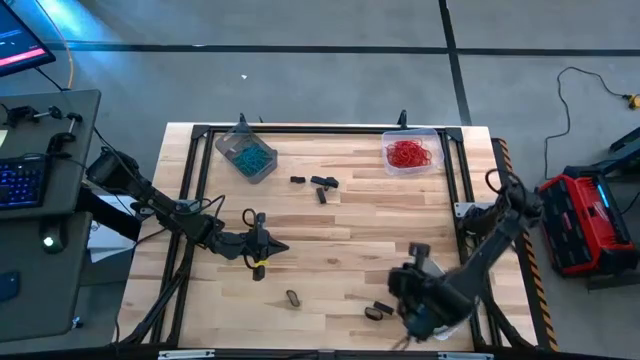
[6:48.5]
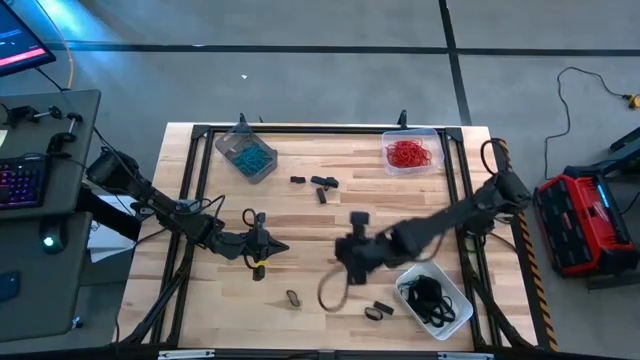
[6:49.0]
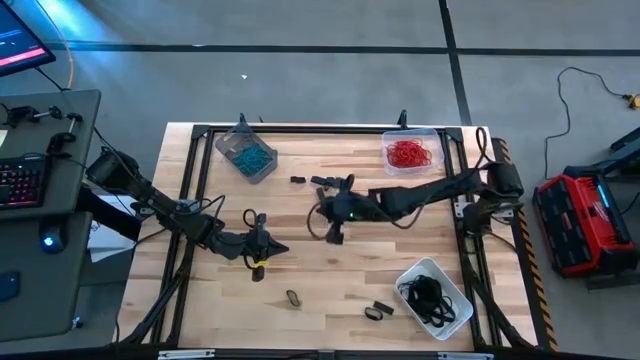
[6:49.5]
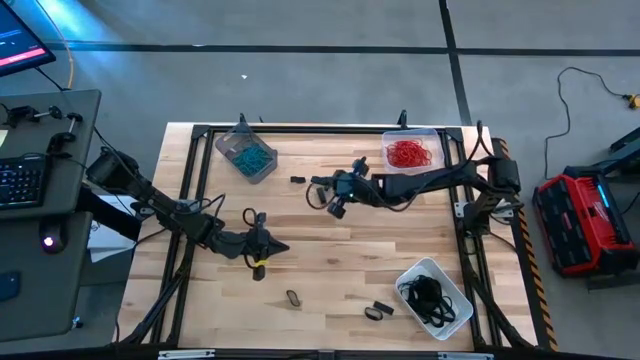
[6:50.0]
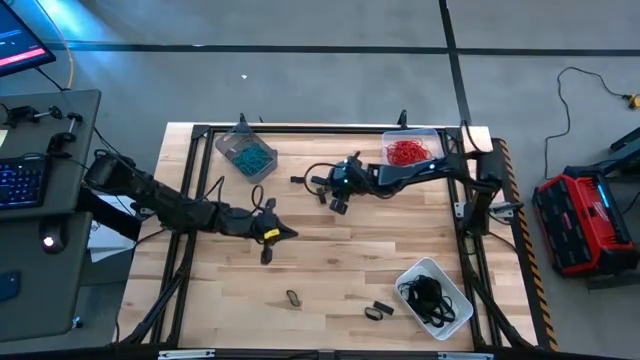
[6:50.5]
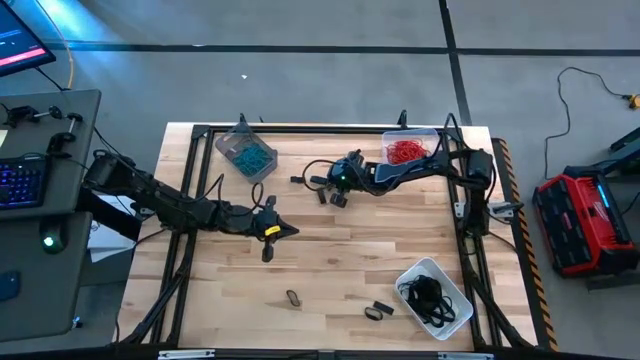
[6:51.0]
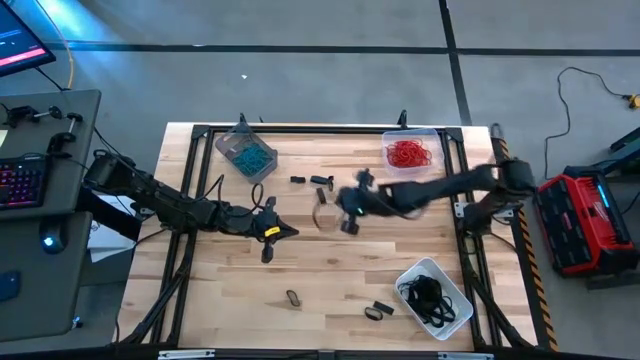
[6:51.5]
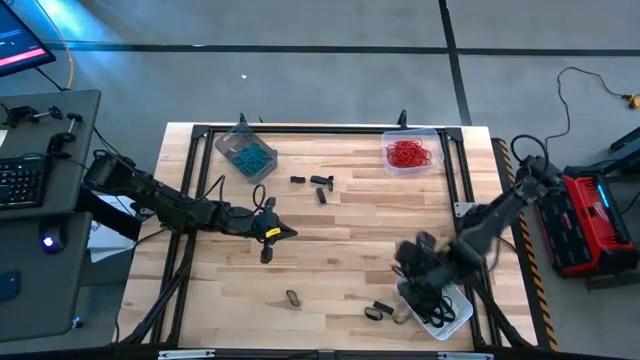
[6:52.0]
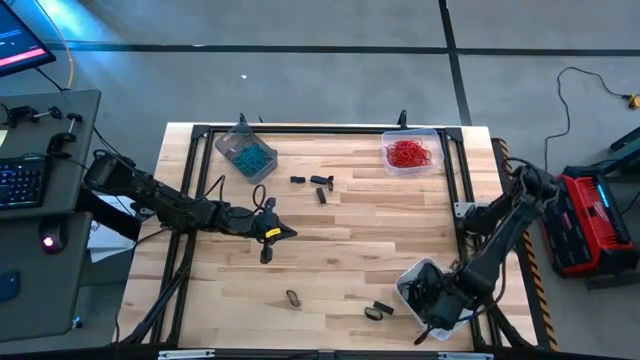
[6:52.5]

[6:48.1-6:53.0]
Task: Sort rubber bands into baskets
Put the black rubber band into the white bin

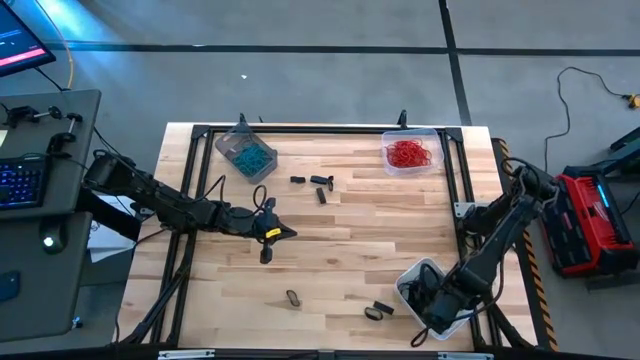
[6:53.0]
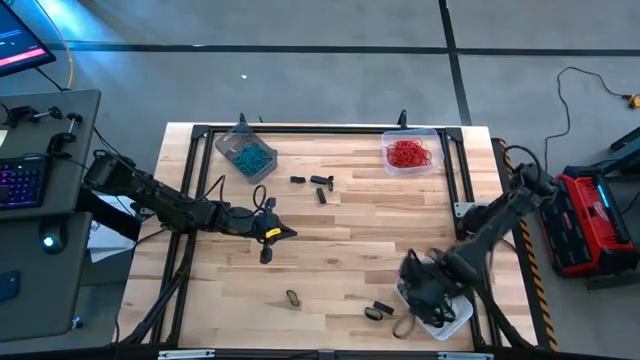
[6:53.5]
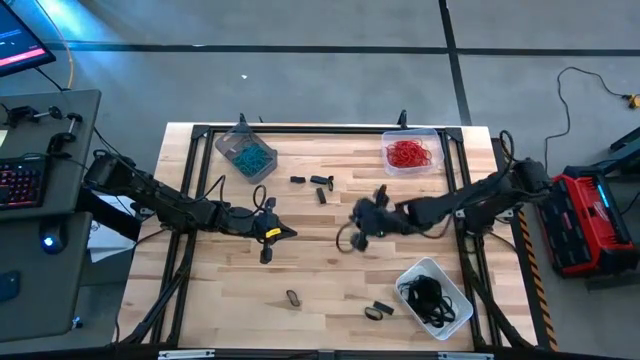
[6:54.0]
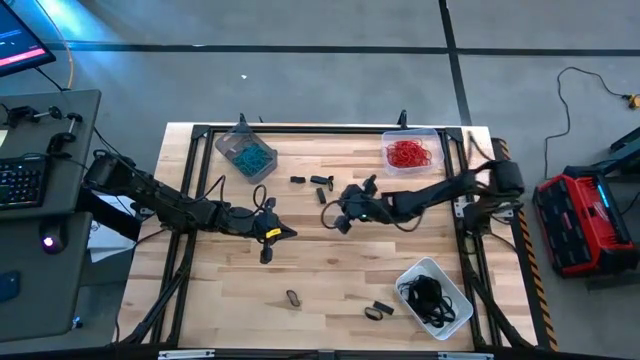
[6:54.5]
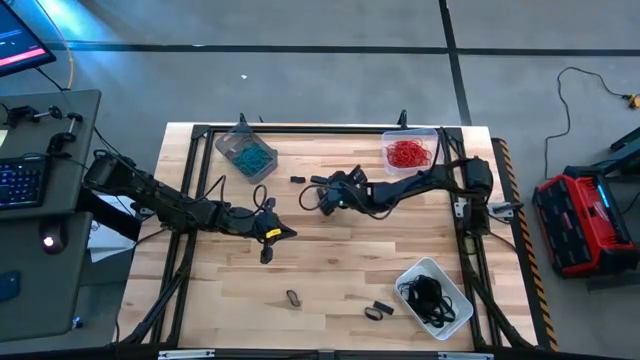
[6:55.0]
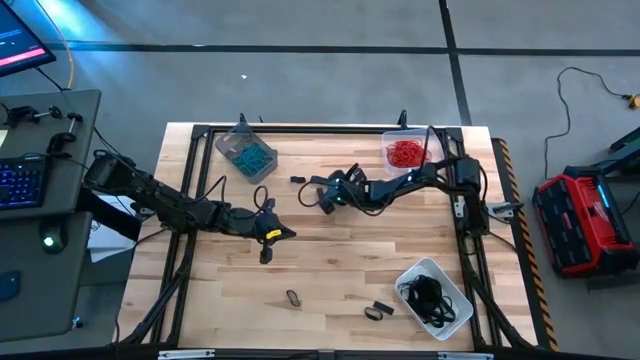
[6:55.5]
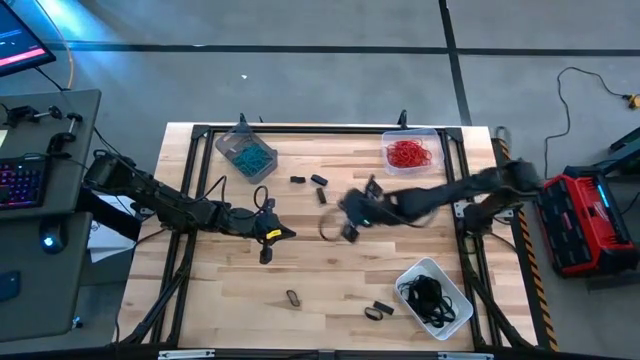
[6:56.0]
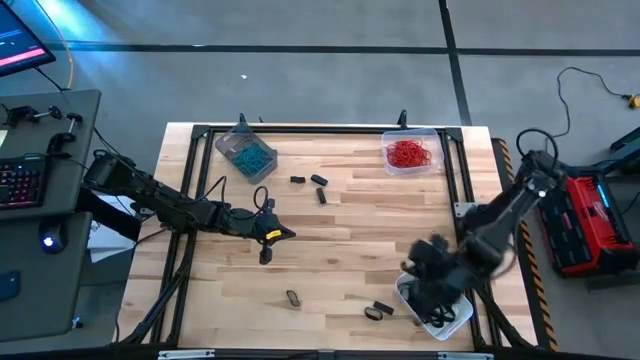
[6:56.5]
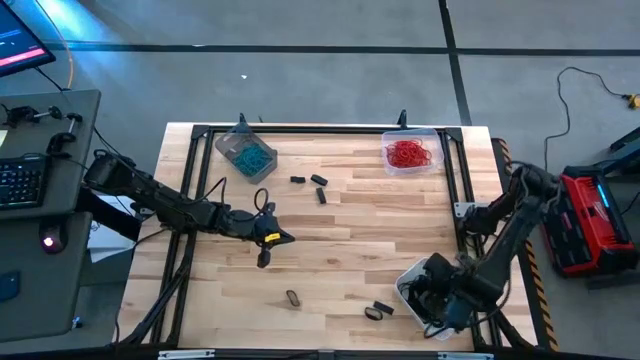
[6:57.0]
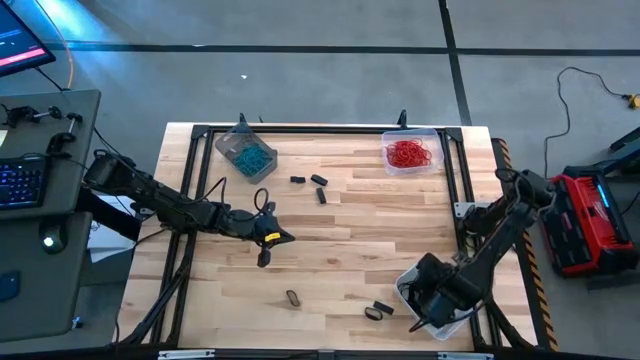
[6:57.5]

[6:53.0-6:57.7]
Put the black rubber band into the white bin

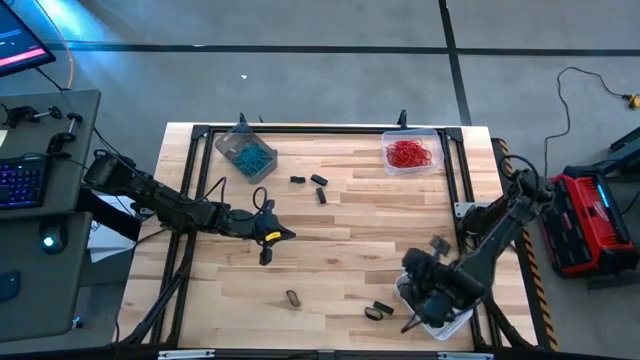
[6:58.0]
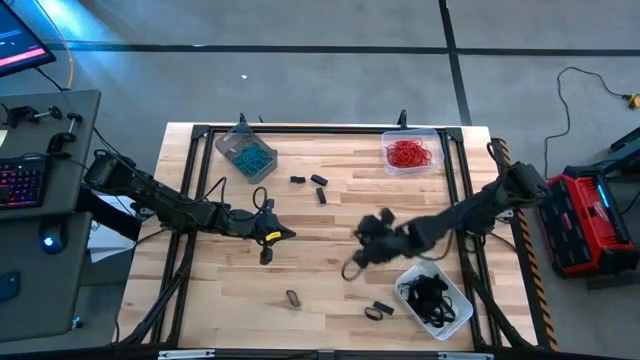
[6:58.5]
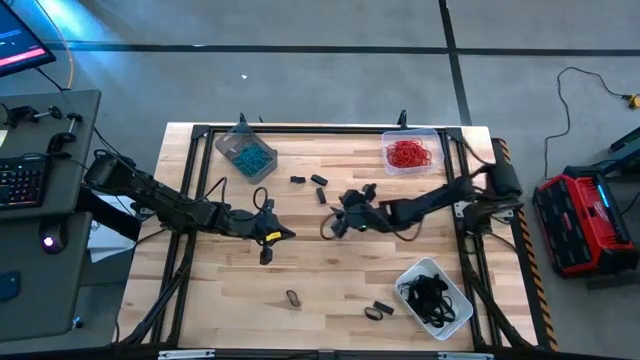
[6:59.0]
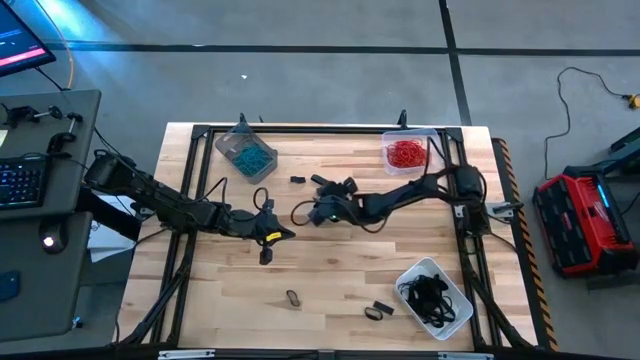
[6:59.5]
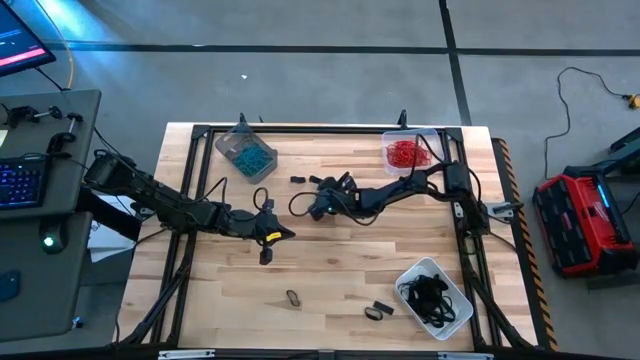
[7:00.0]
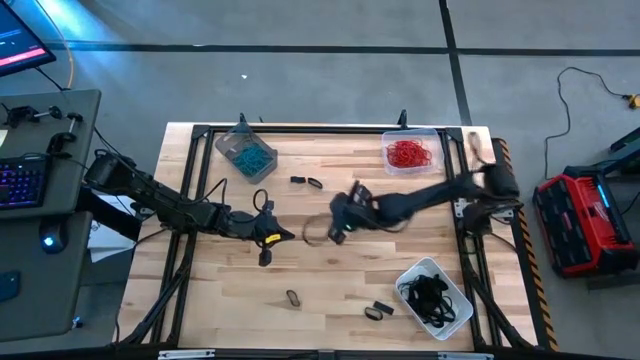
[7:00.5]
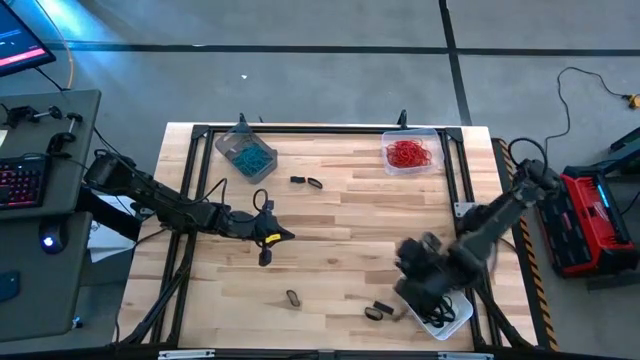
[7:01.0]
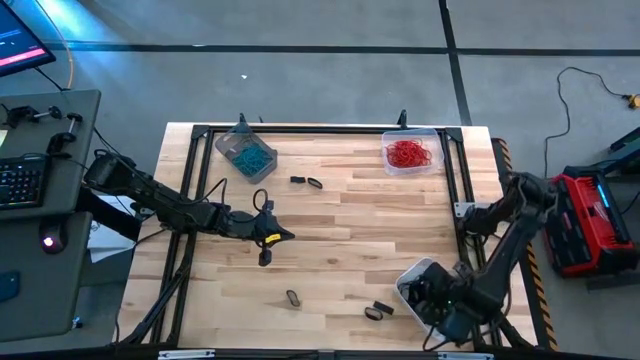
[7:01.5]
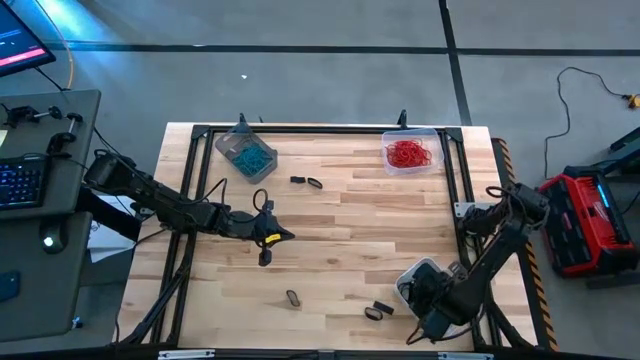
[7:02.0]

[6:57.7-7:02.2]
Put the black rubber band into the white bin

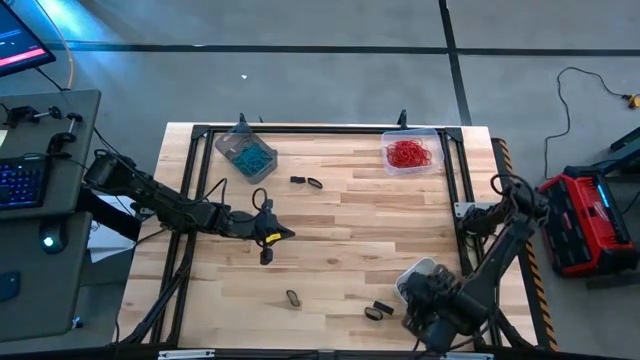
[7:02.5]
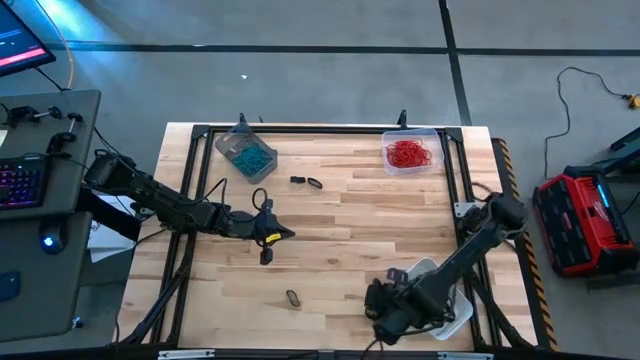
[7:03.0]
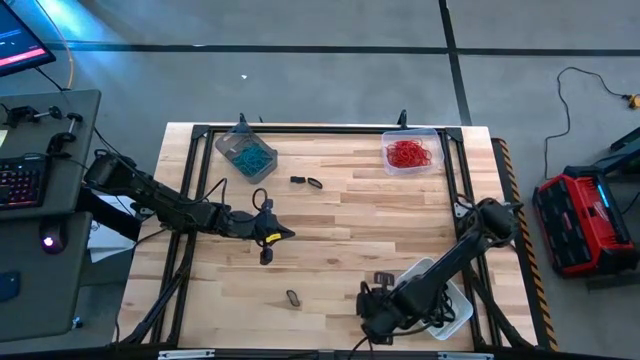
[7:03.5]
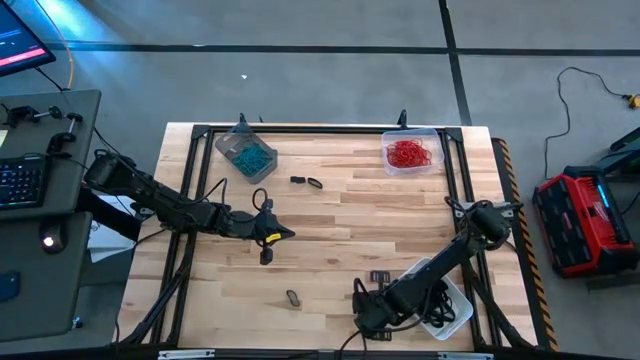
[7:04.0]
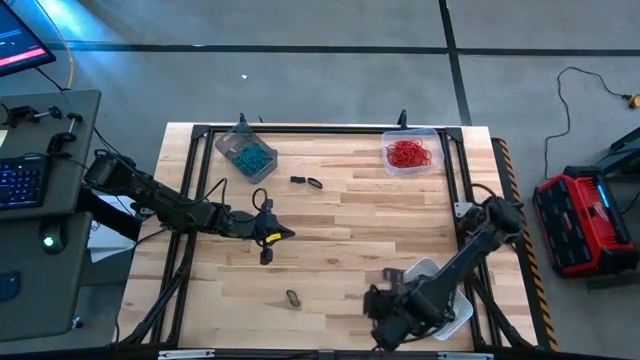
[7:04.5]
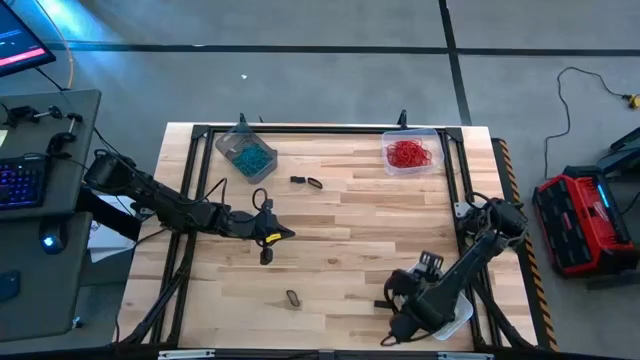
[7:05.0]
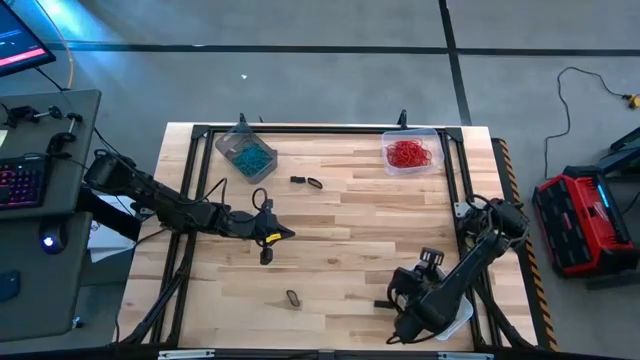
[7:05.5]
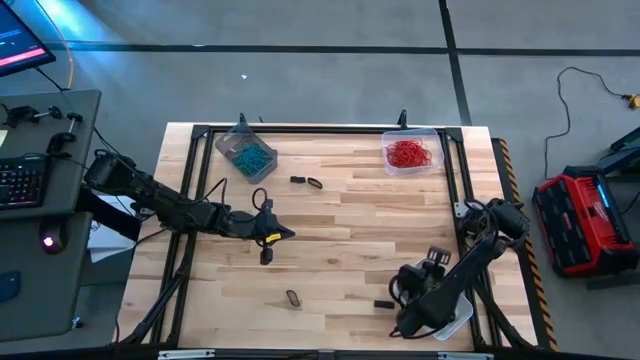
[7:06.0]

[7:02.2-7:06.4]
Put the black rubber band into the white bin

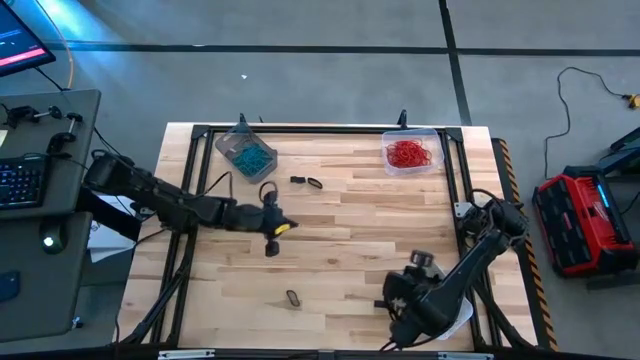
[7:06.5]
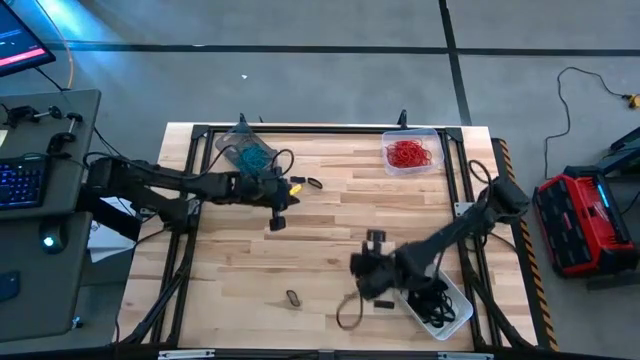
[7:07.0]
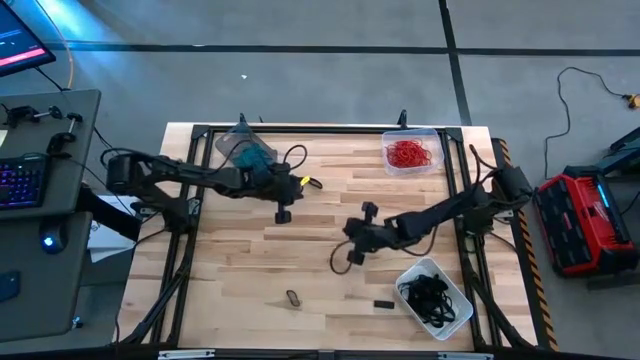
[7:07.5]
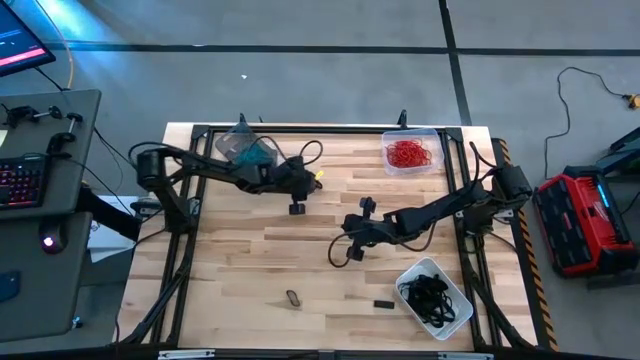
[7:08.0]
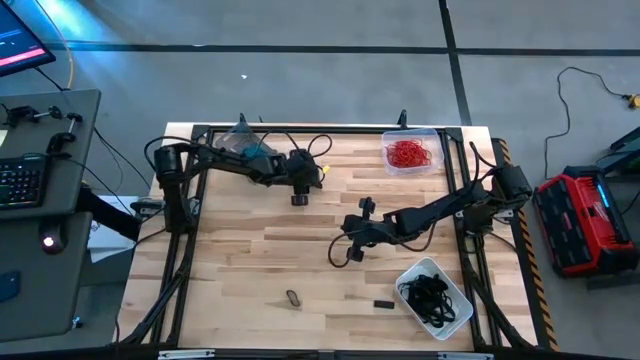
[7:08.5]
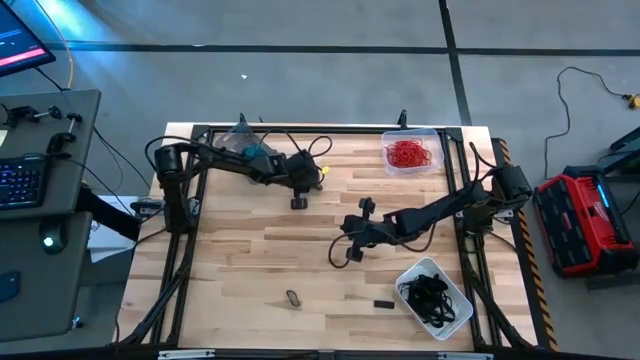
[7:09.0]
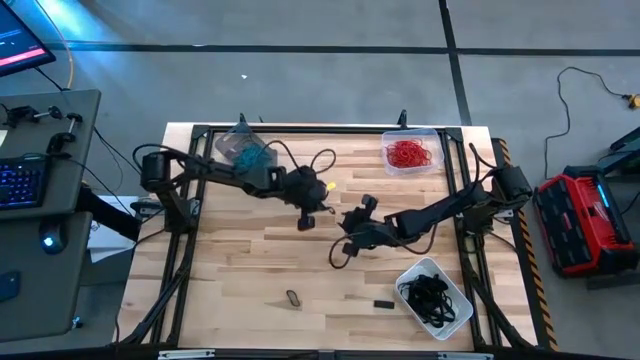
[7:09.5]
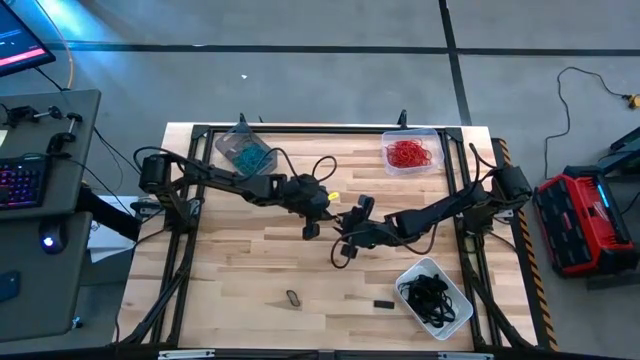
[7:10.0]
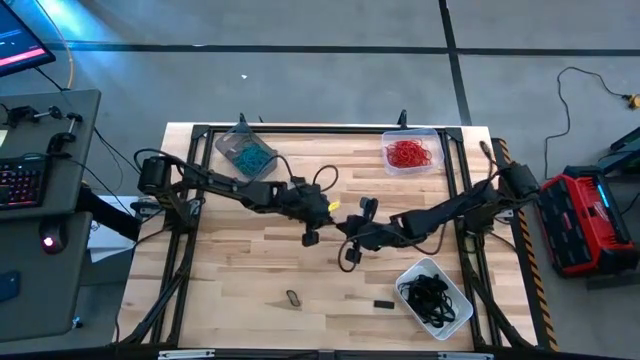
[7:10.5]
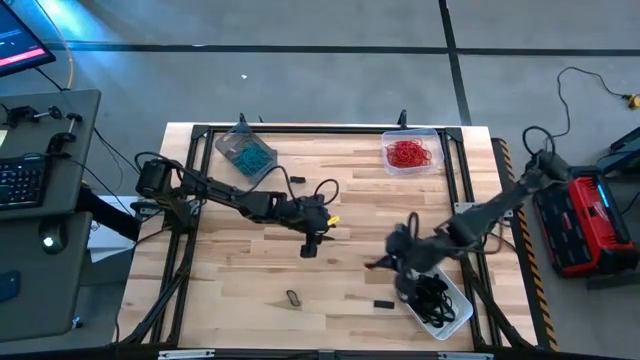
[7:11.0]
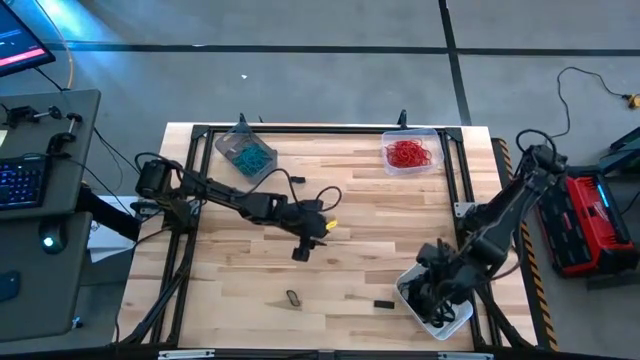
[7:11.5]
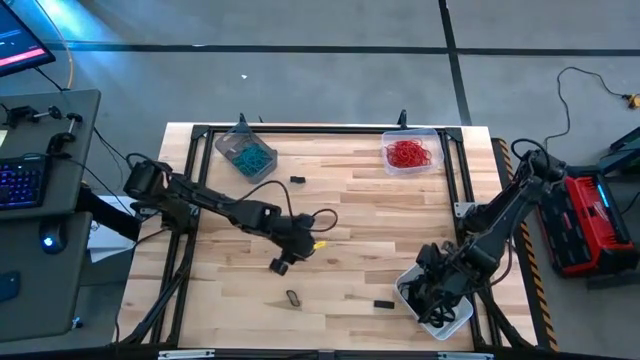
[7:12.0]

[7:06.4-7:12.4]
Put the black rubber band into the white bin
